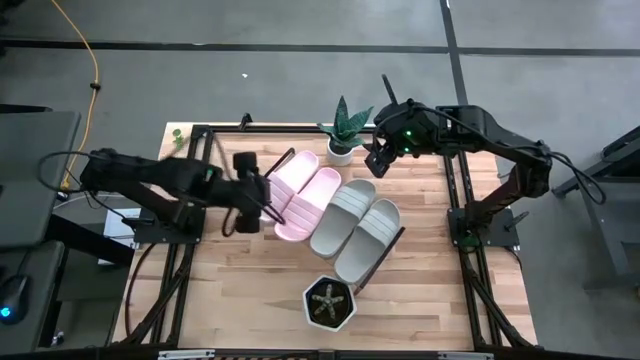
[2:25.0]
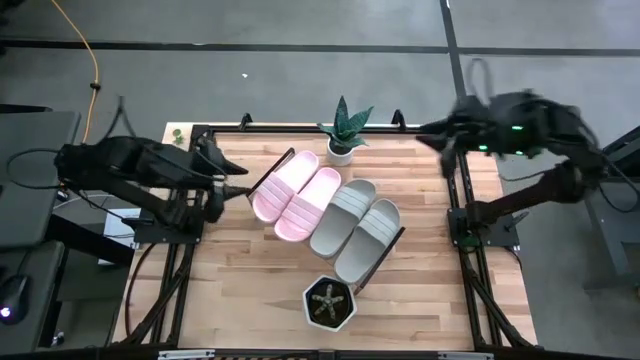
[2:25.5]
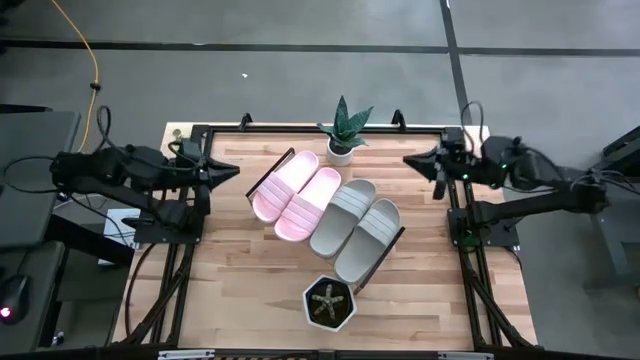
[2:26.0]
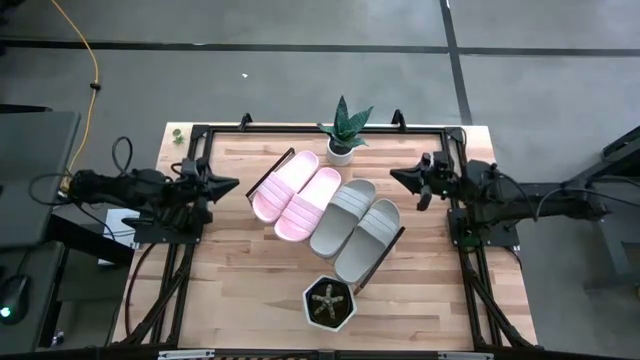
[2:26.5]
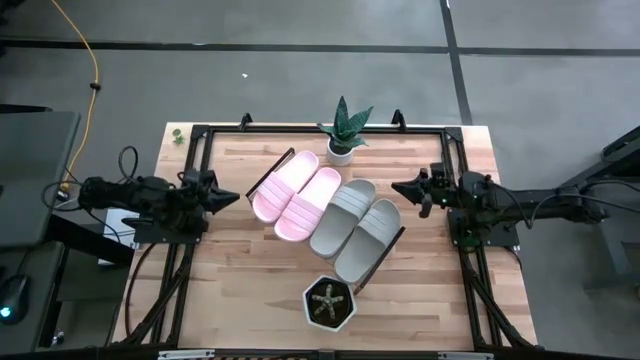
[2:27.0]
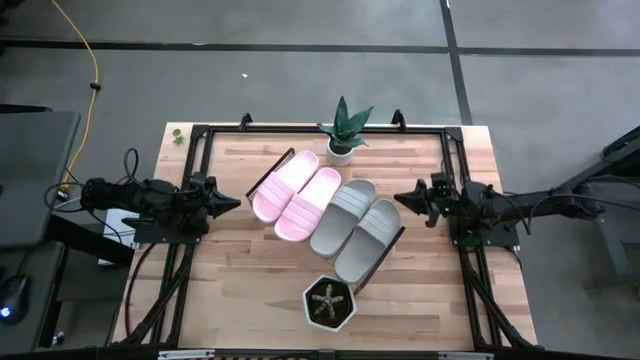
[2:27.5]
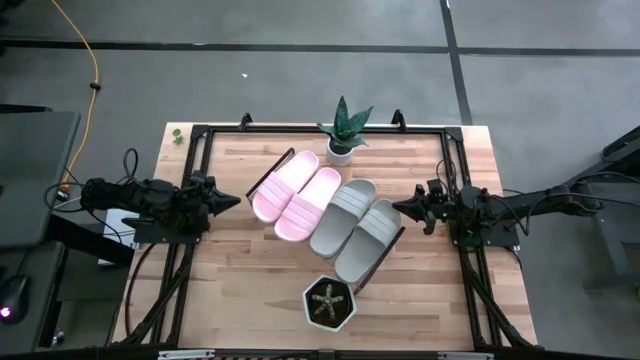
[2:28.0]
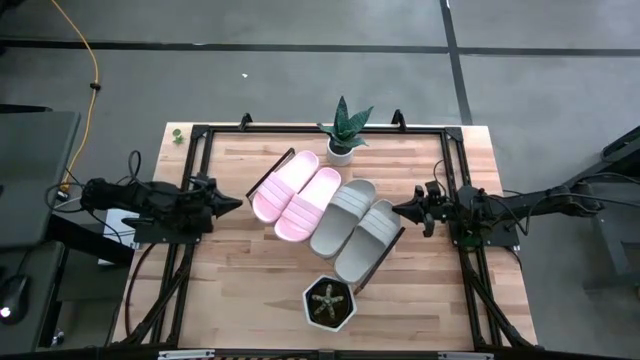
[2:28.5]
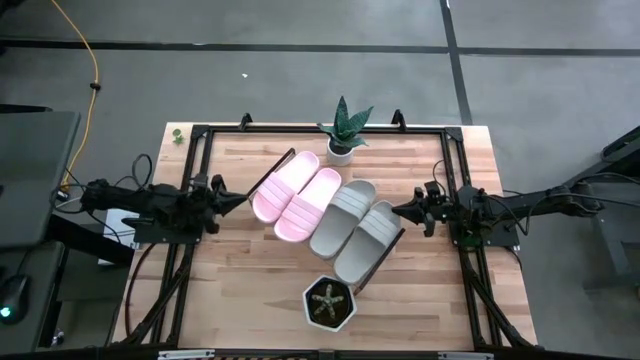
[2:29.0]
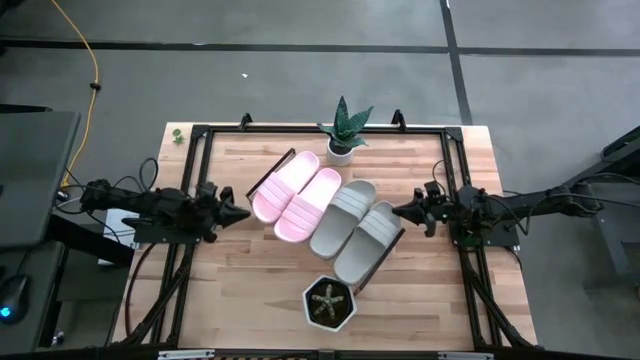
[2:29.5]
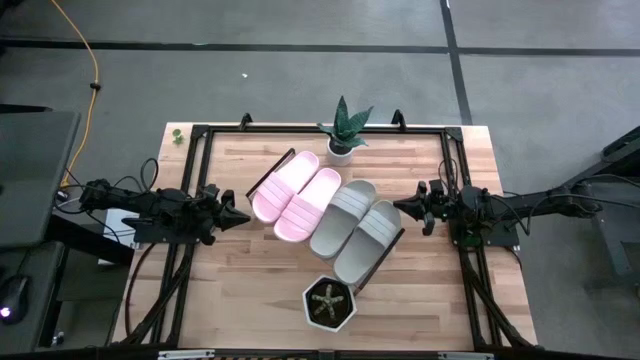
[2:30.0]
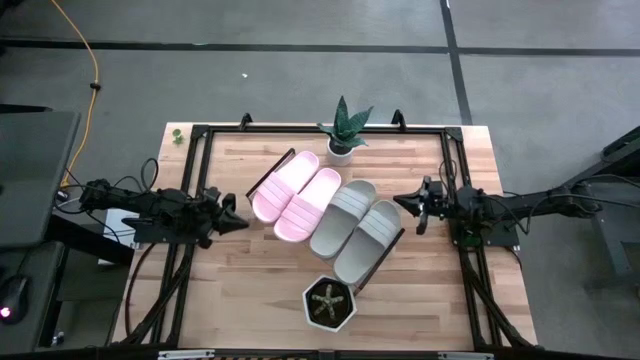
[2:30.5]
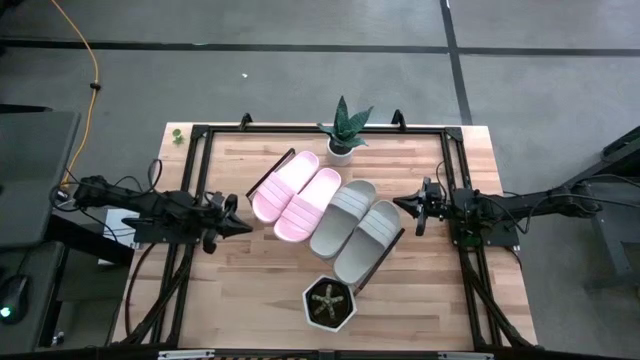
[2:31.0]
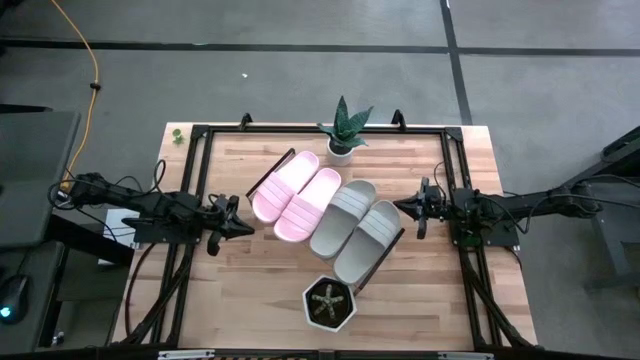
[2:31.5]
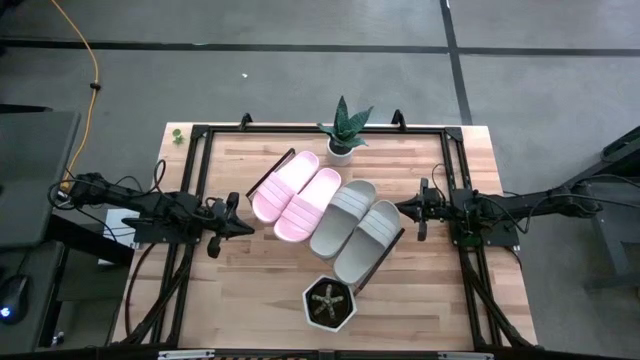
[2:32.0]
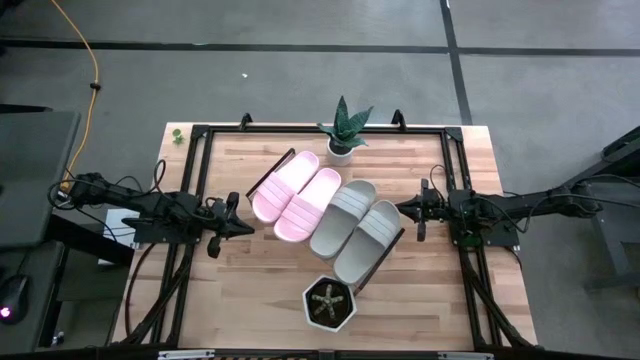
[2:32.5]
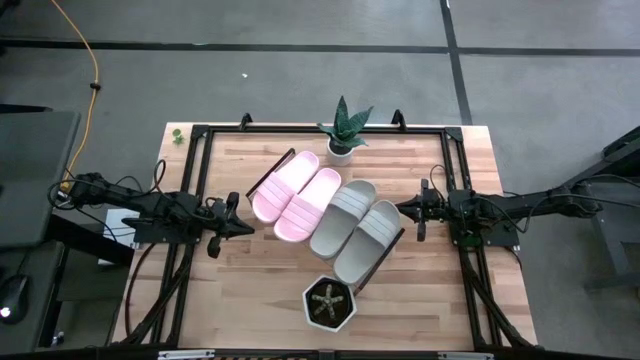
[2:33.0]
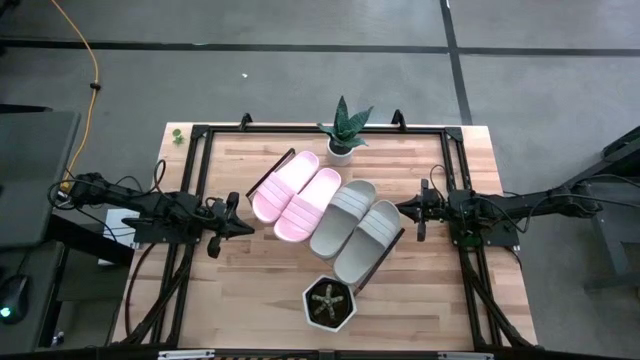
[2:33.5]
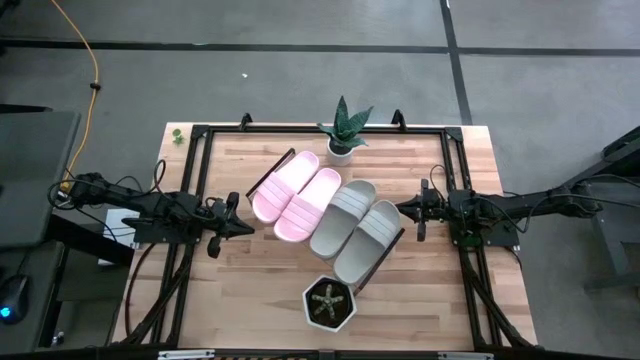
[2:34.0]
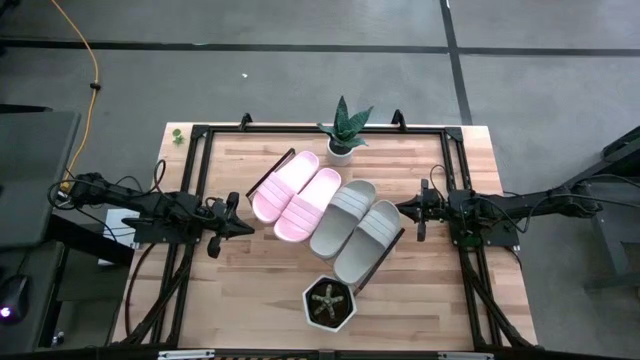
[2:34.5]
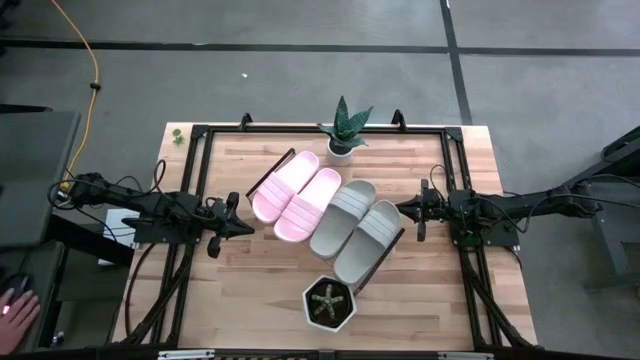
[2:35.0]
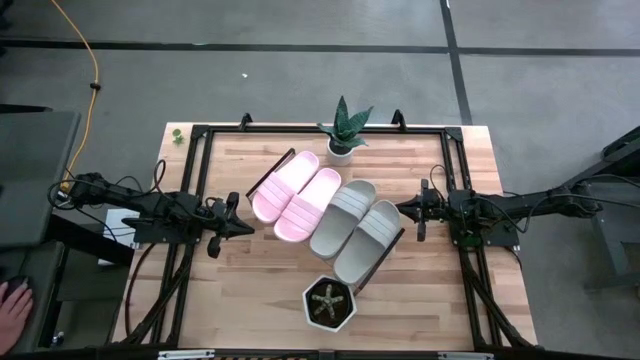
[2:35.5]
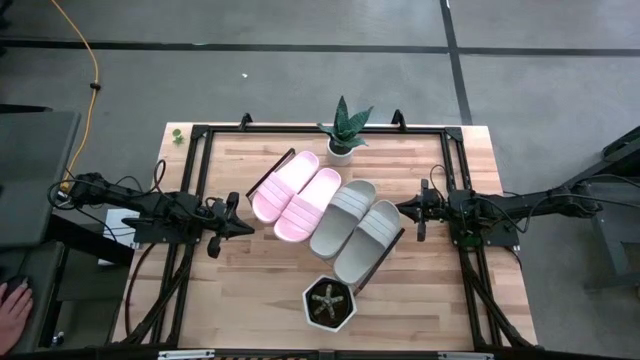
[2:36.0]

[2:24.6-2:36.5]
Task: Pick and place slides into the shelf
Return to Home Position
